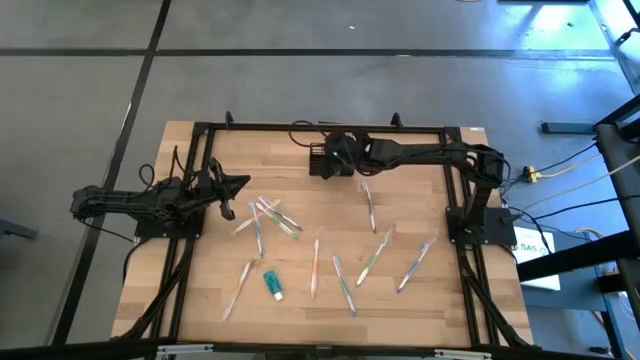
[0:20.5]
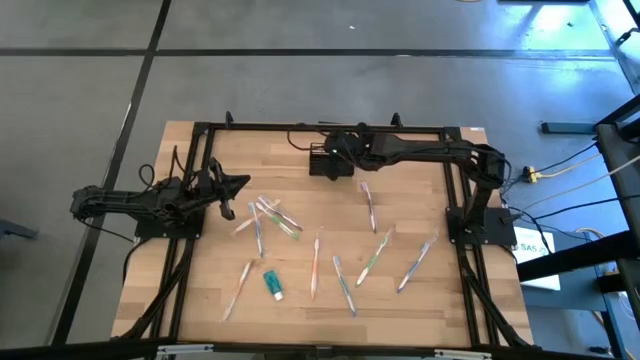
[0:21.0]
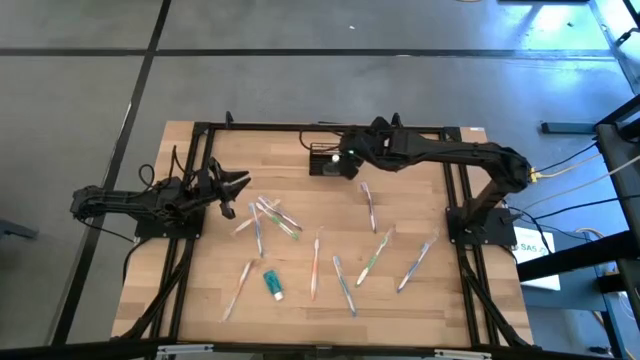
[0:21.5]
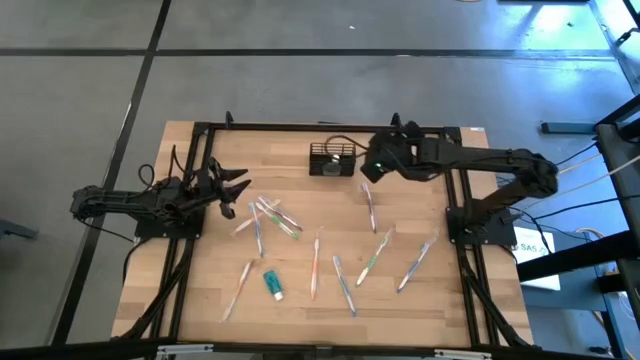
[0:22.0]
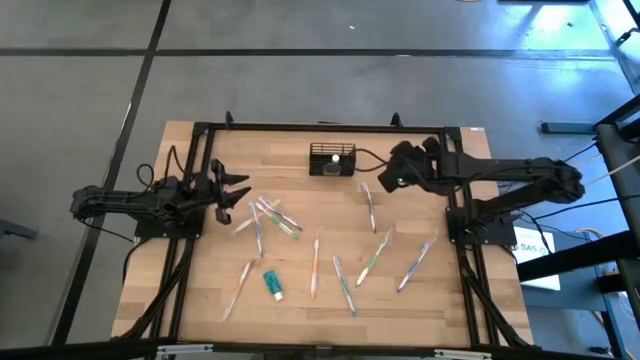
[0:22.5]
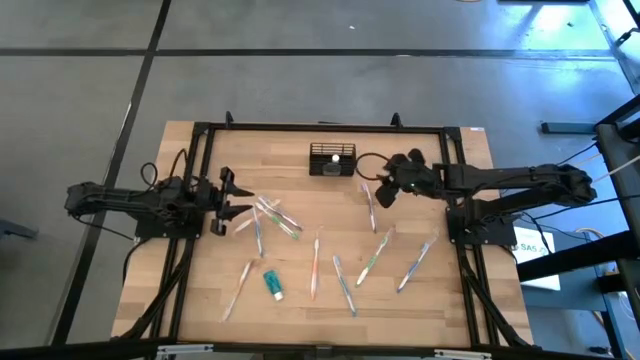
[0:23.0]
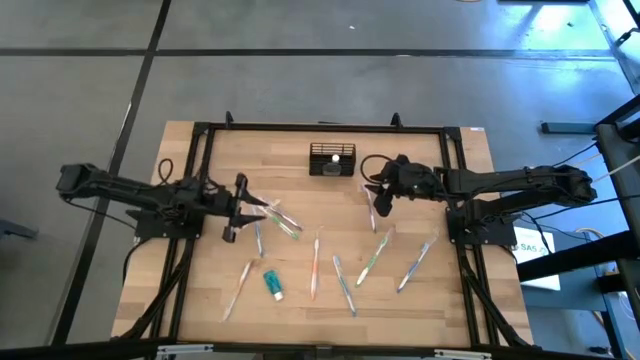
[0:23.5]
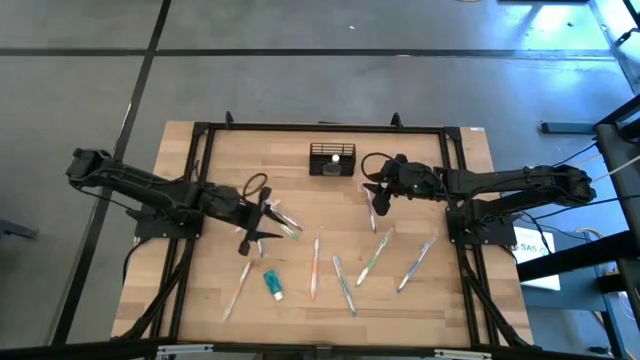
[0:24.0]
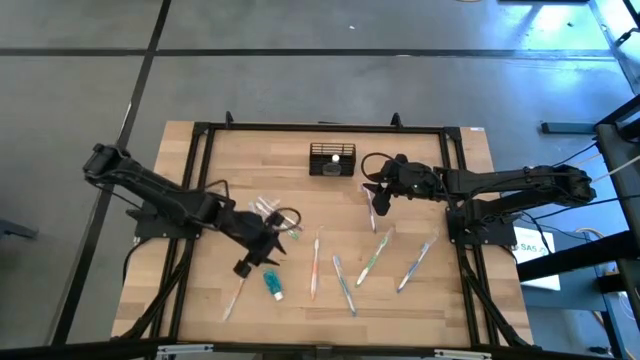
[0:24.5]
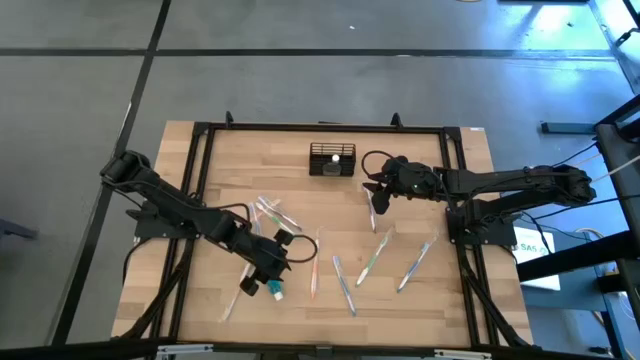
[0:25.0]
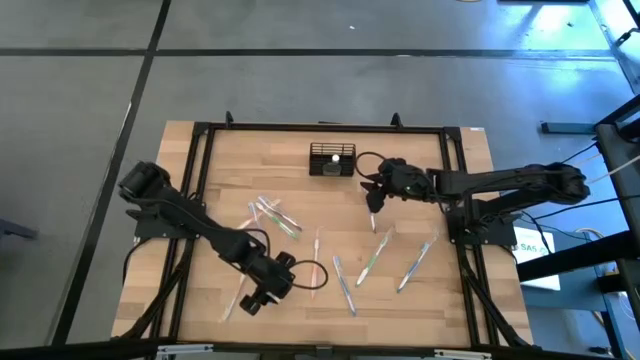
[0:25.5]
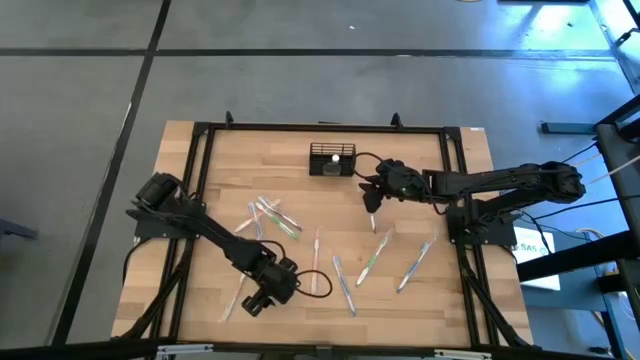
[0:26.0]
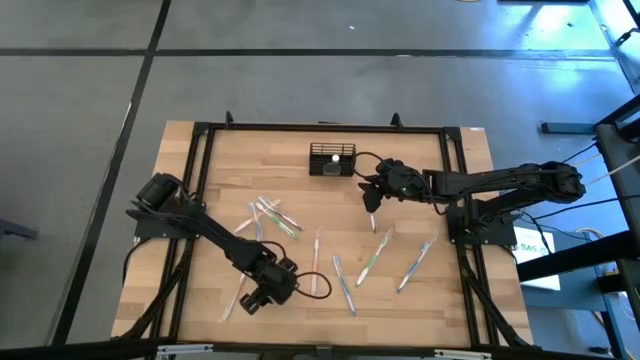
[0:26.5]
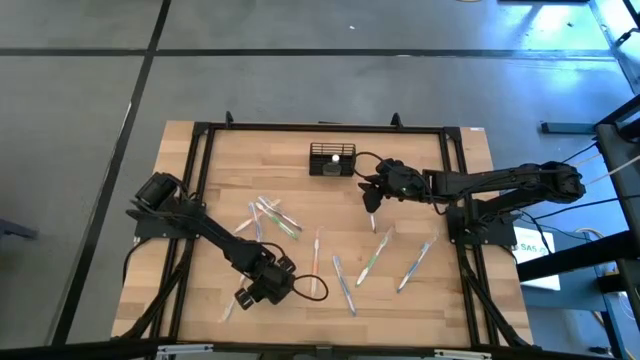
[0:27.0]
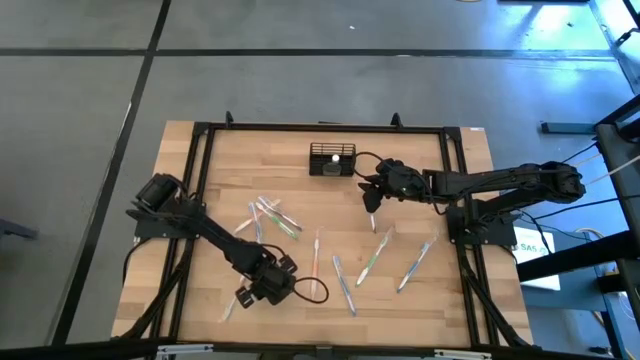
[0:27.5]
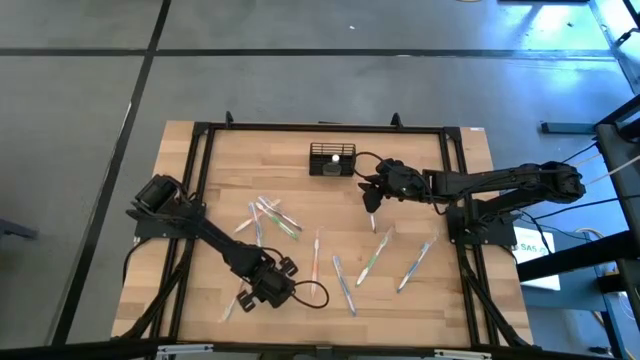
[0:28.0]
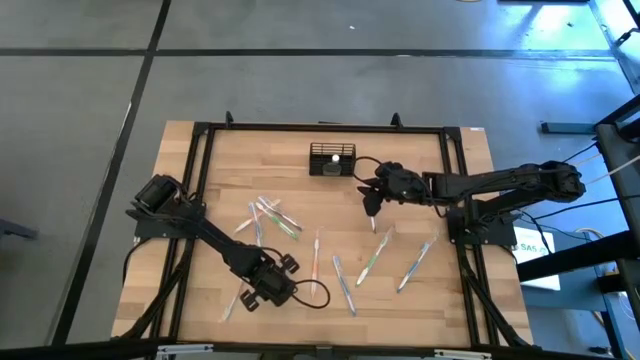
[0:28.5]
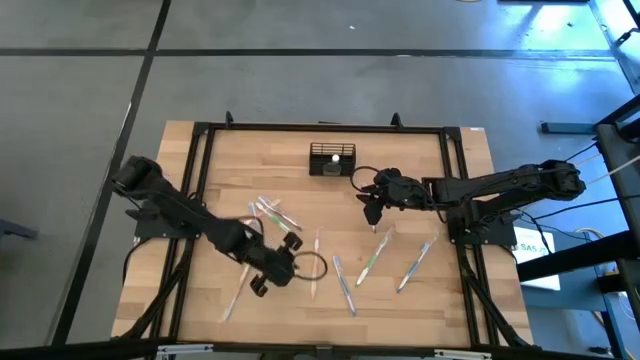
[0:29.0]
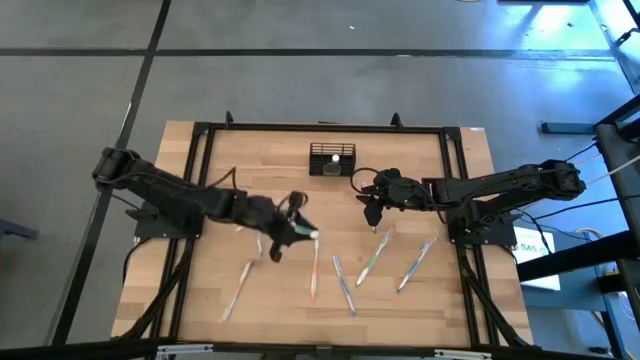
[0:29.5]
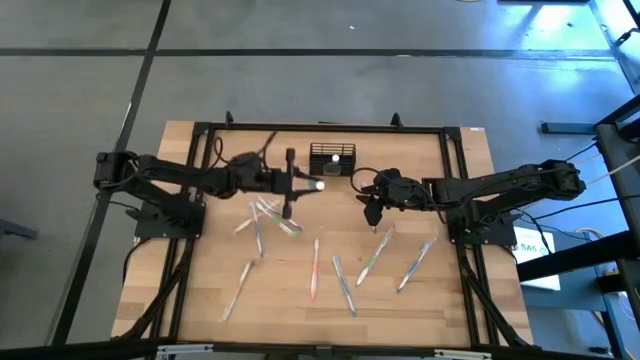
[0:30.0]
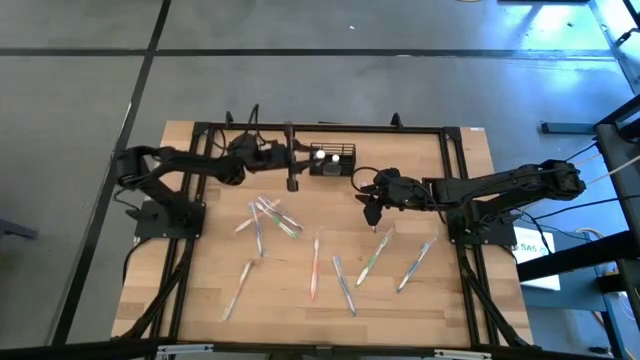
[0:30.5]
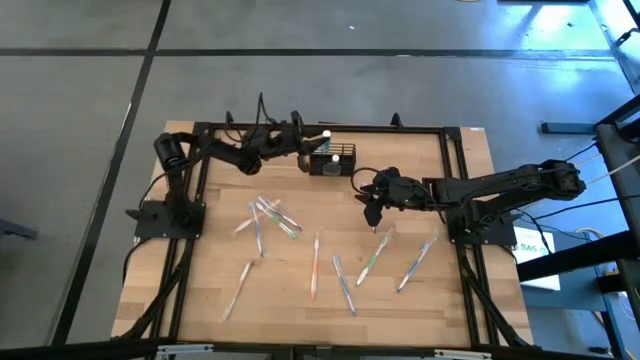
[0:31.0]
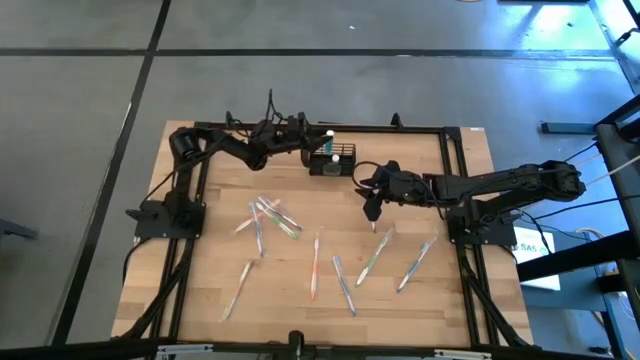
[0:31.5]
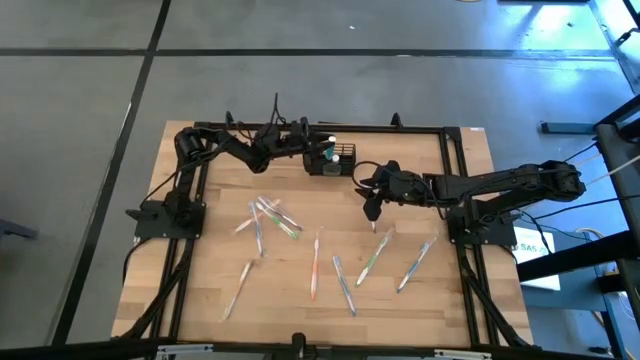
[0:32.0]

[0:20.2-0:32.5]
Task: Pick & Place toothbrushing station
Put the mouthwash into the middle section of the wire organizer

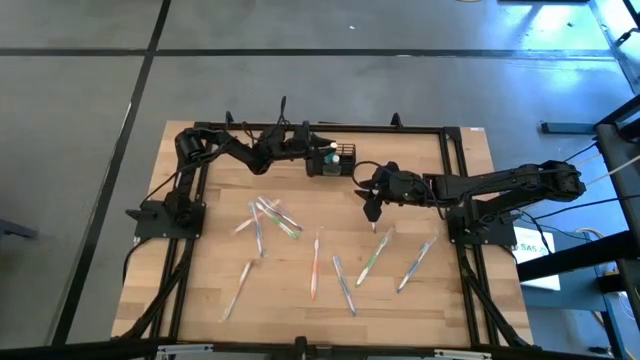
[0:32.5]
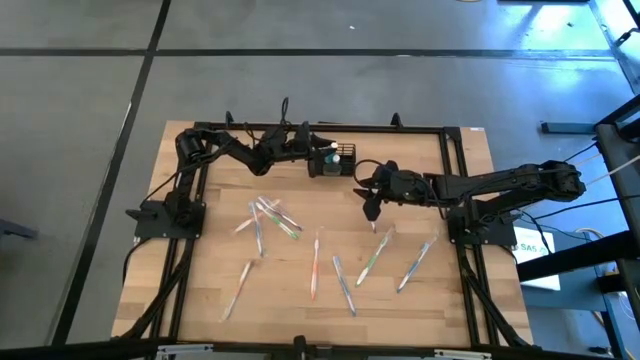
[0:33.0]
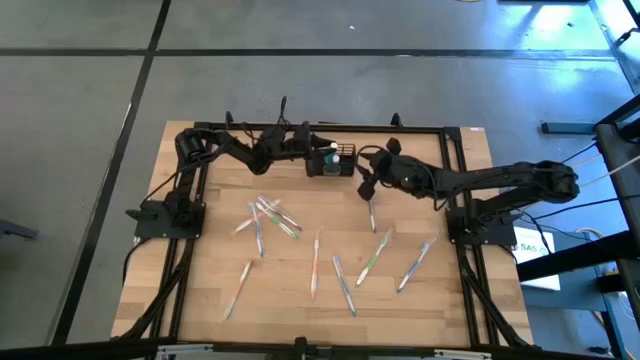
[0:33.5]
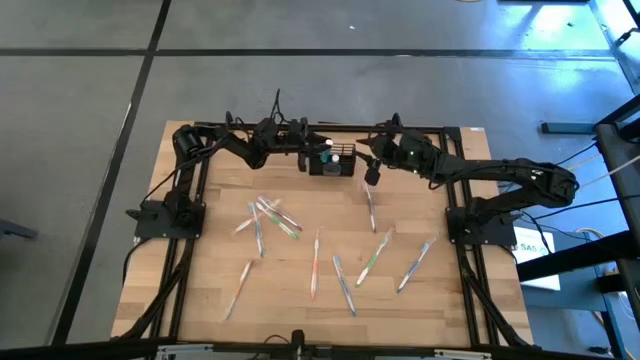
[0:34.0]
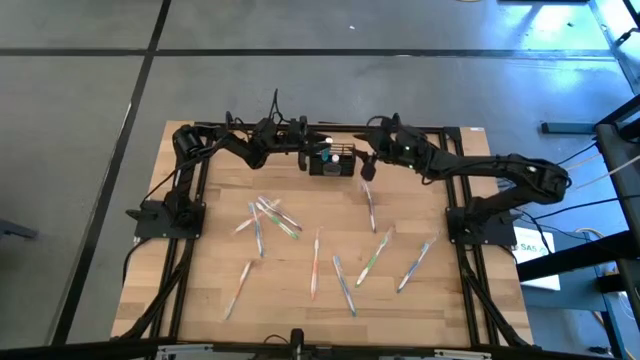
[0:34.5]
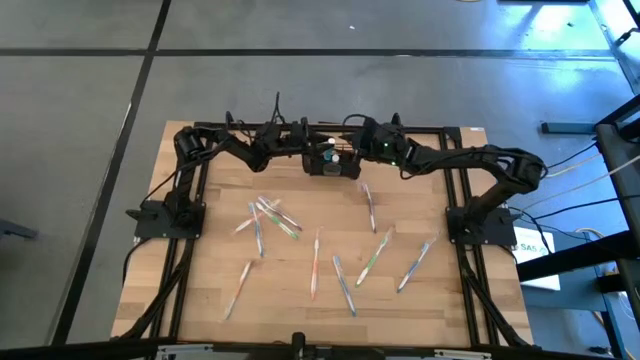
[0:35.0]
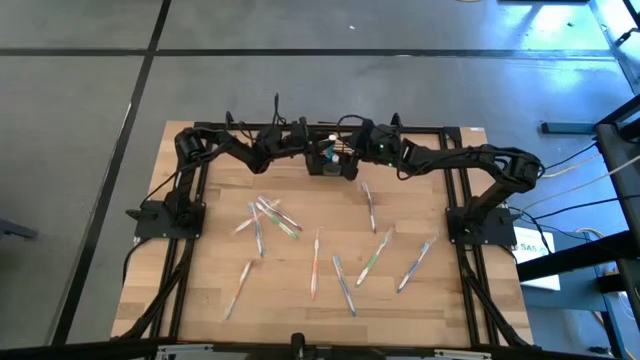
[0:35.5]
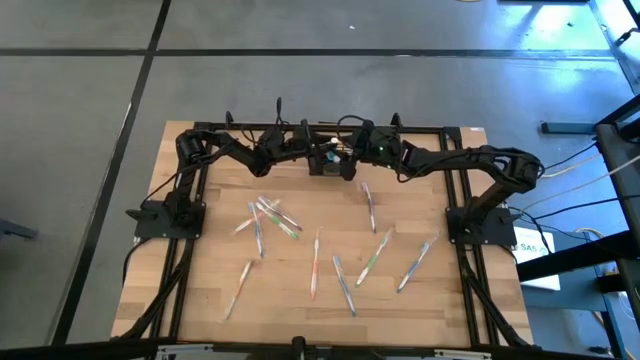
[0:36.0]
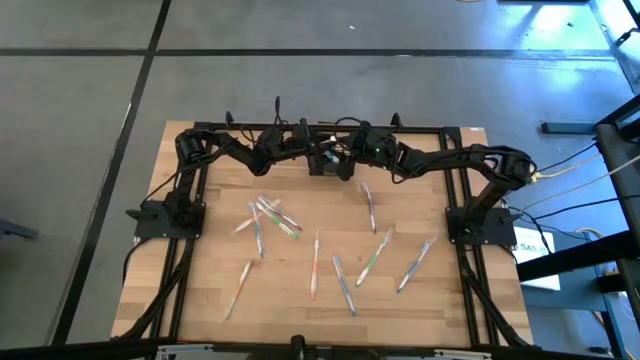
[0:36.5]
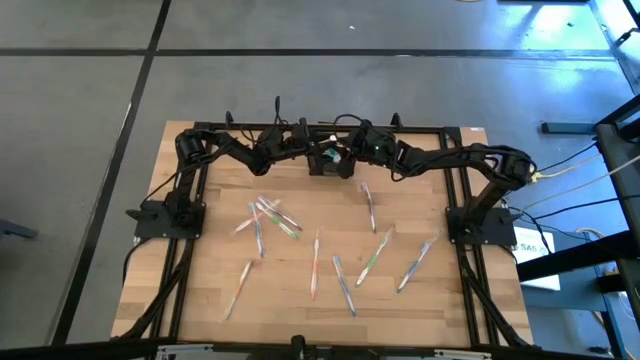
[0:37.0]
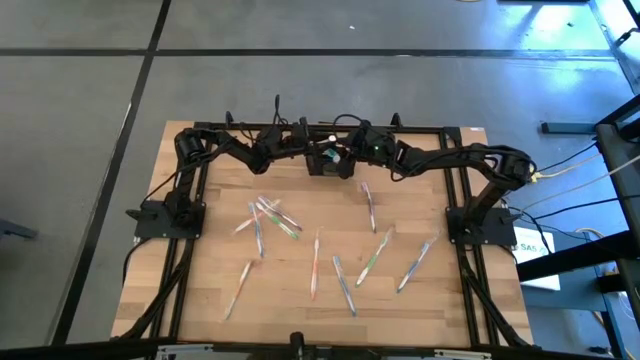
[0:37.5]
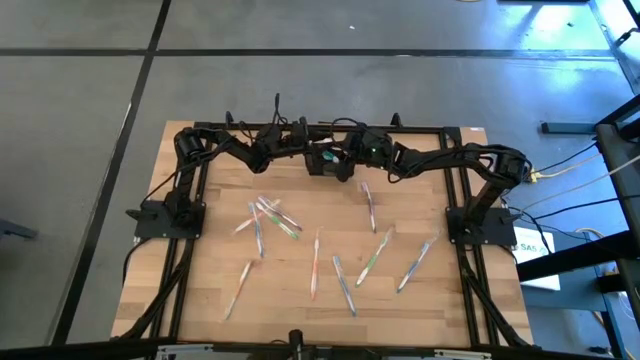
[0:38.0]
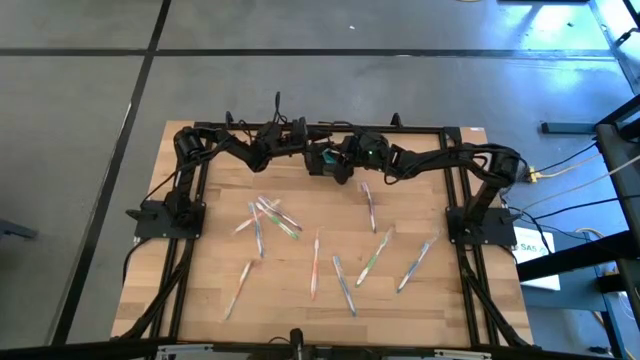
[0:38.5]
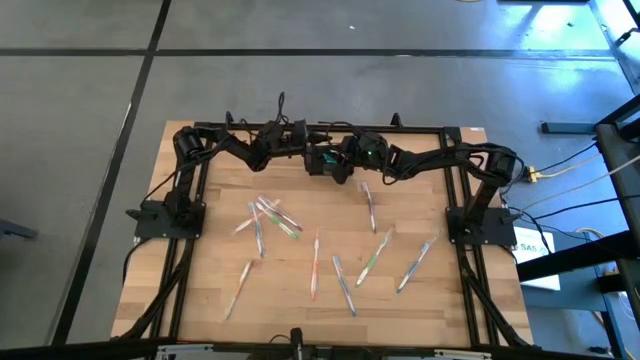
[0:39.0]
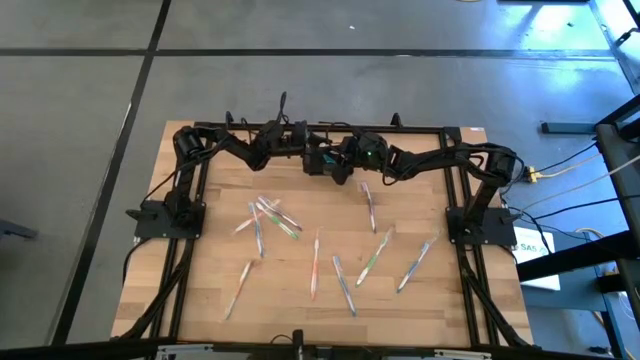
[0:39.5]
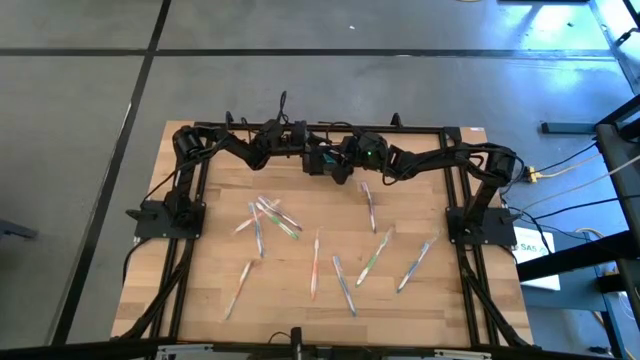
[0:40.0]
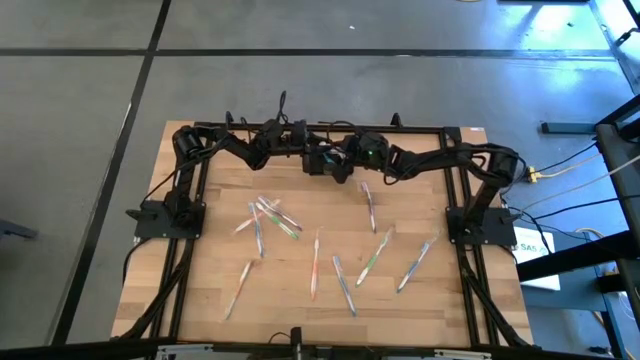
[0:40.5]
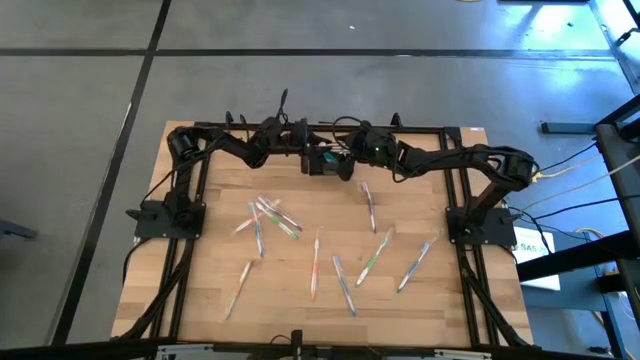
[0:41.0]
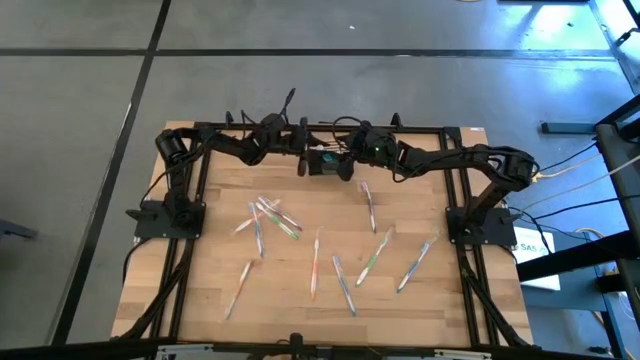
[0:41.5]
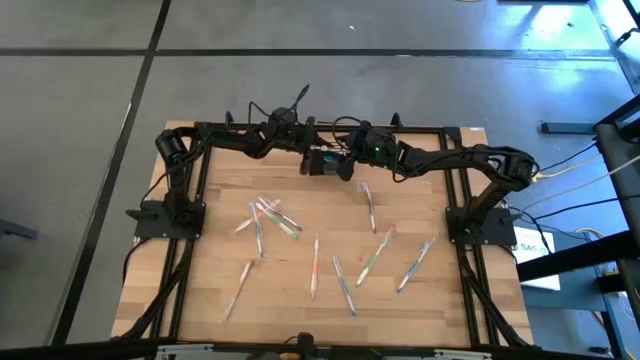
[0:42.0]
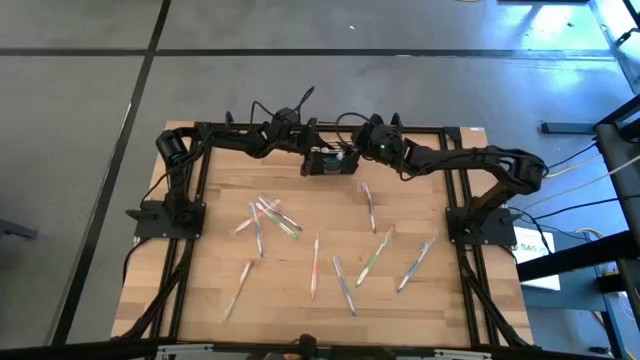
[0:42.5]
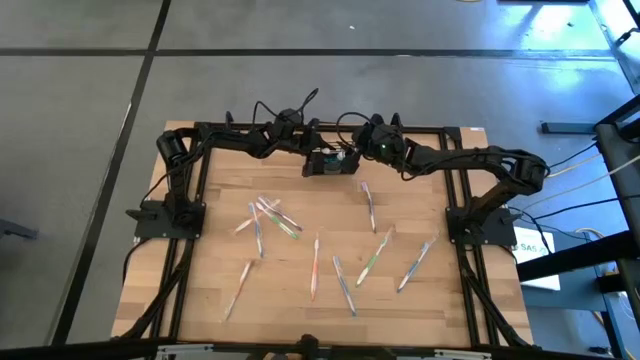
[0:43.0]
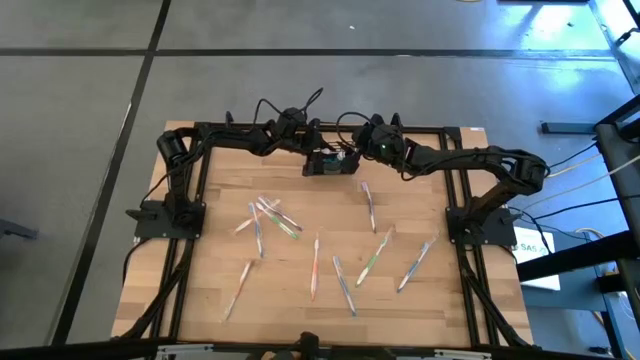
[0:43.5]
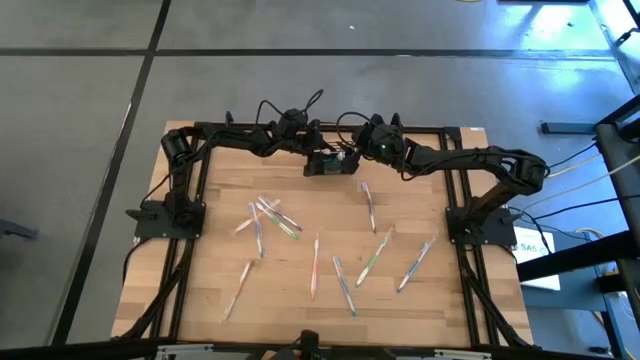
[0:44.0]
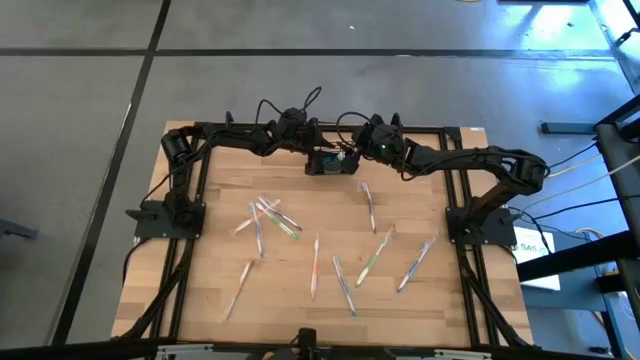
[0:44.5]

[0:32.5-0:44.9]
Put the mouthwash into the middle section of the wire organizer
